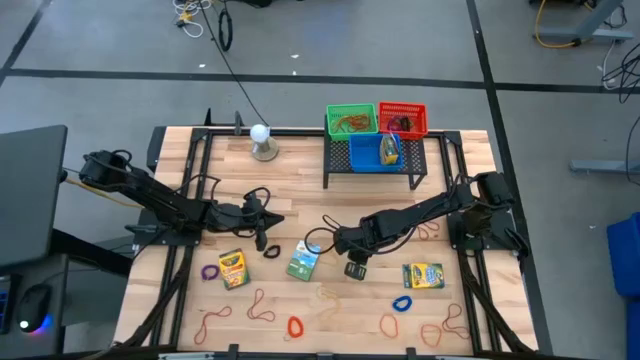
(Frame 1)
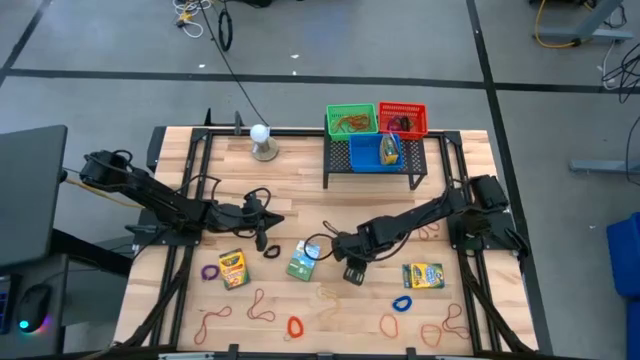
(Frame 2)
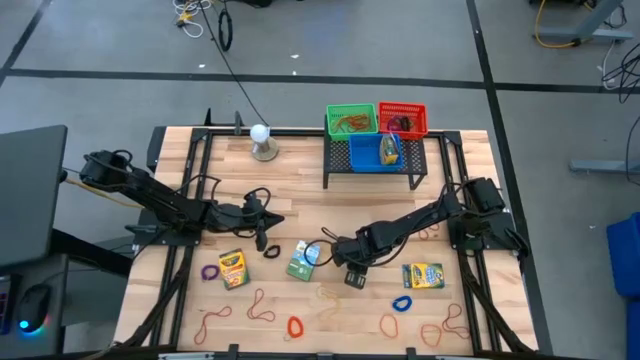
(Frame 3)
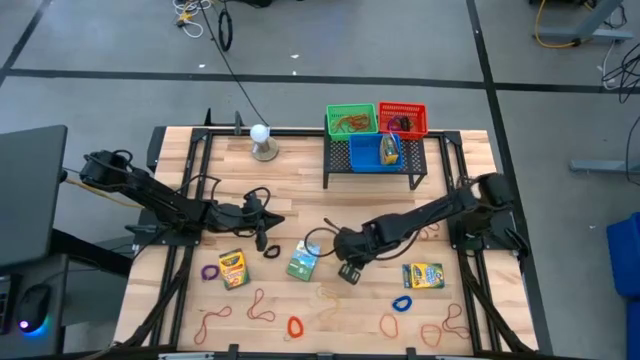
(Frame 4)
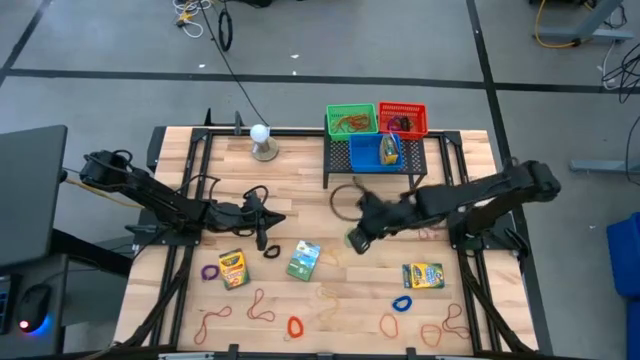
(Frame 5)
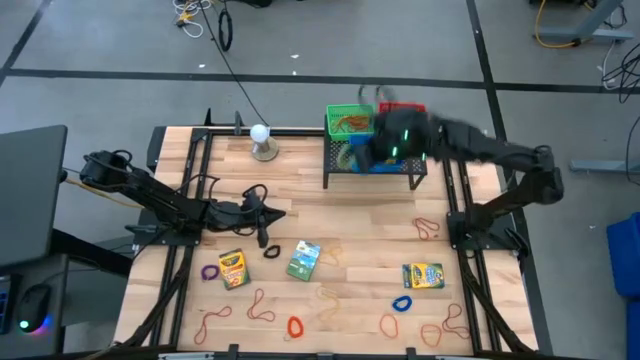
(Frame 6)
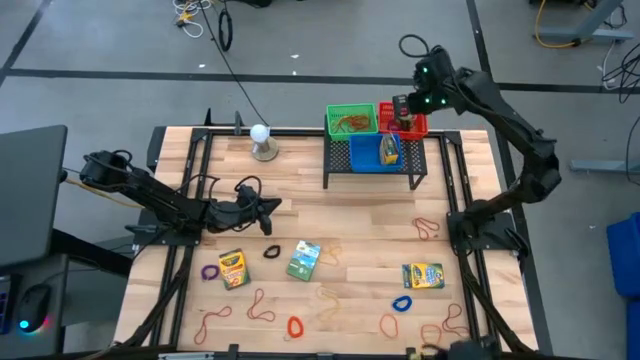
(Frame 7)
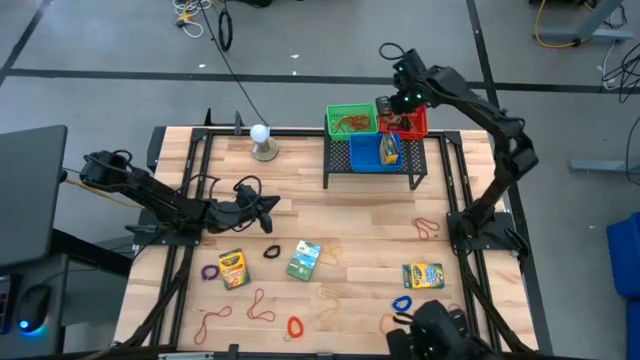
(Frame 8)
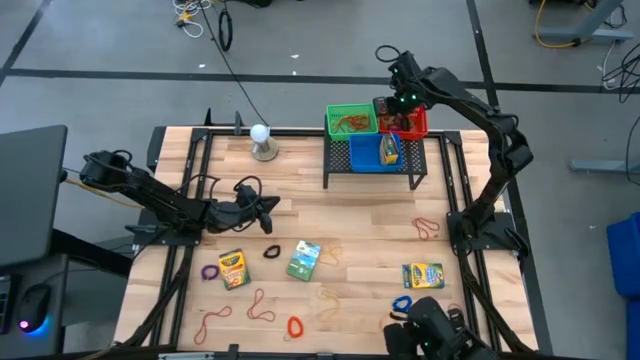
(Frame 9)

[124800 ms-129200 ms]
Task: Pick & Place Office Desk Supplies
Put the green spiral keychain into the red bin

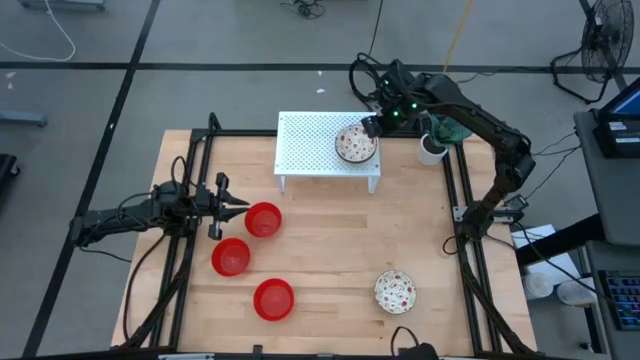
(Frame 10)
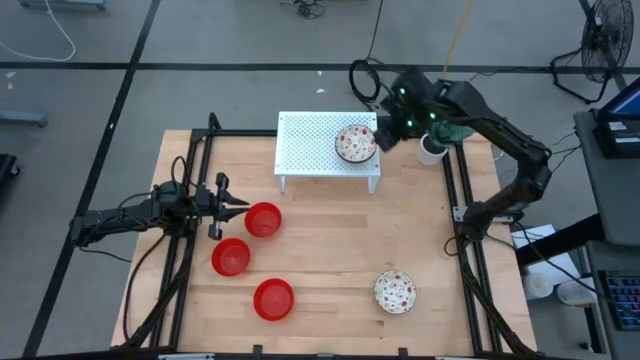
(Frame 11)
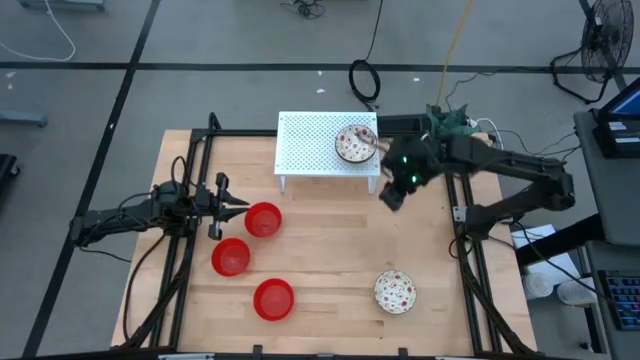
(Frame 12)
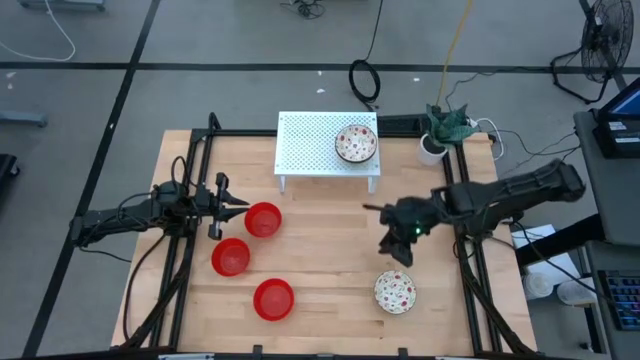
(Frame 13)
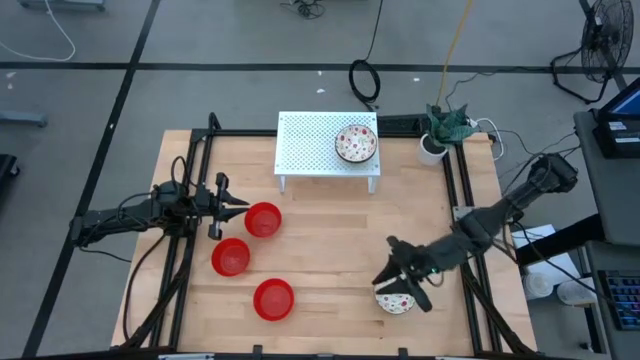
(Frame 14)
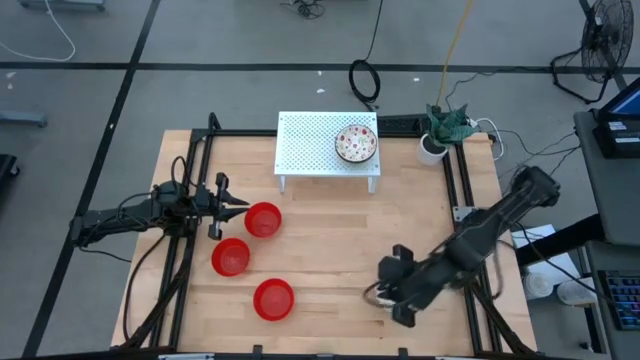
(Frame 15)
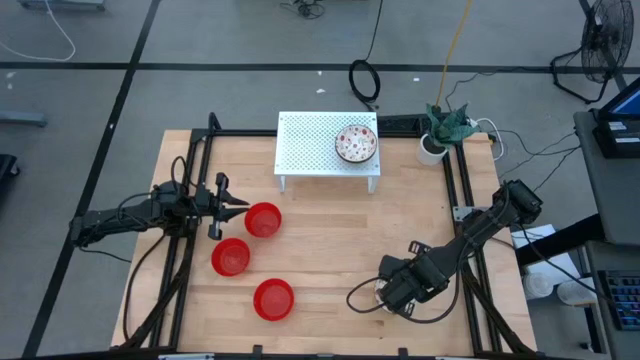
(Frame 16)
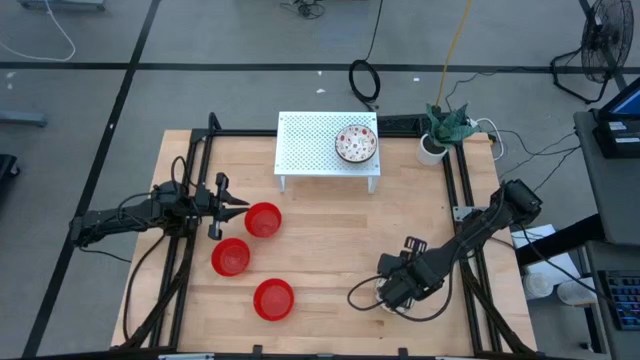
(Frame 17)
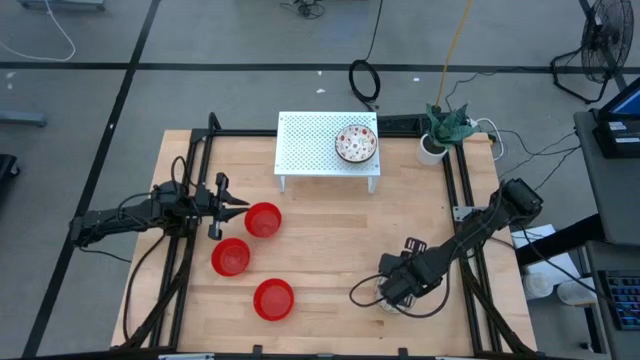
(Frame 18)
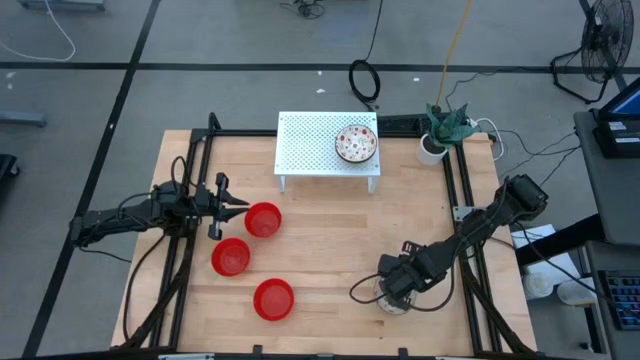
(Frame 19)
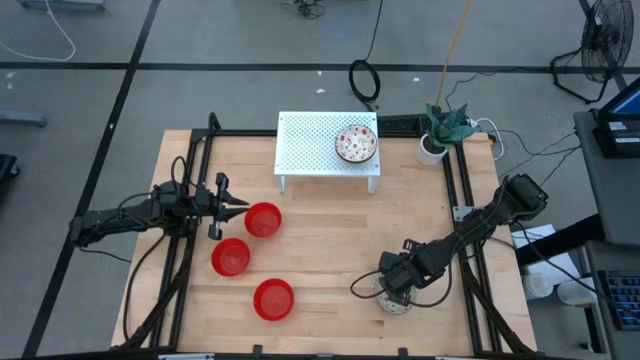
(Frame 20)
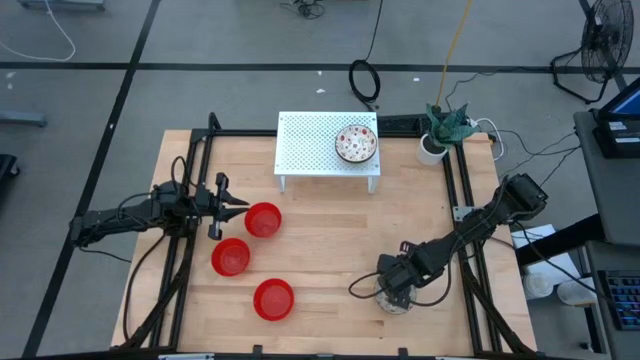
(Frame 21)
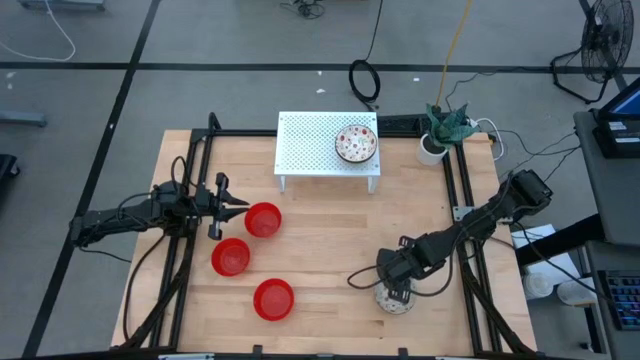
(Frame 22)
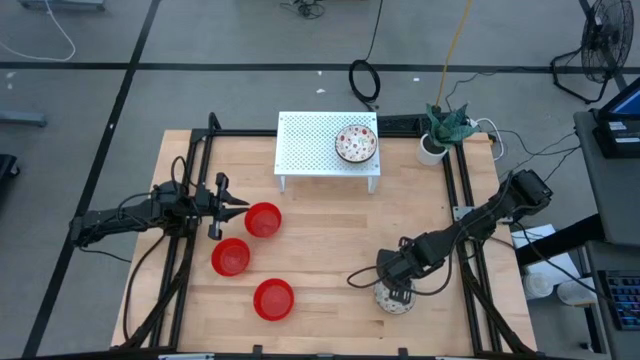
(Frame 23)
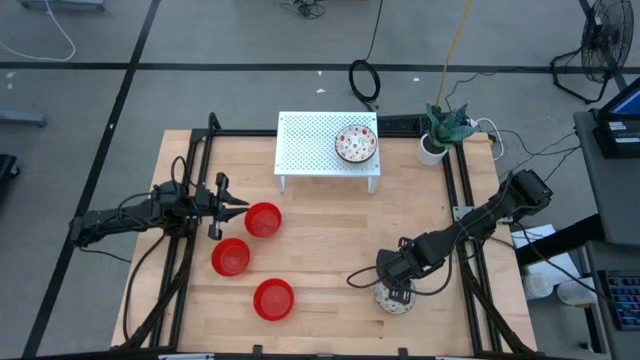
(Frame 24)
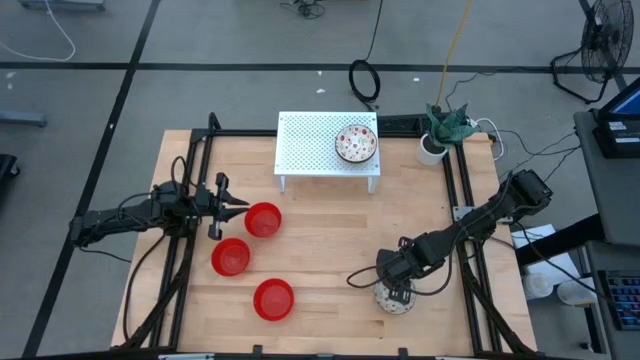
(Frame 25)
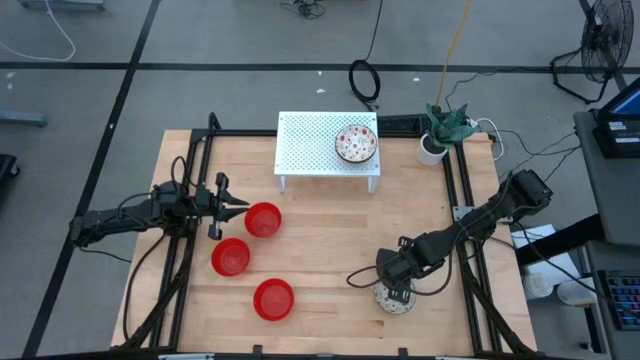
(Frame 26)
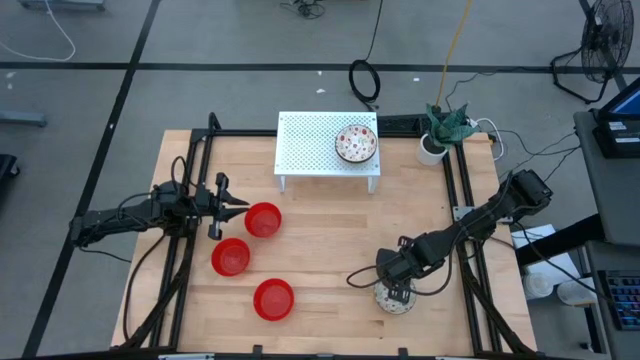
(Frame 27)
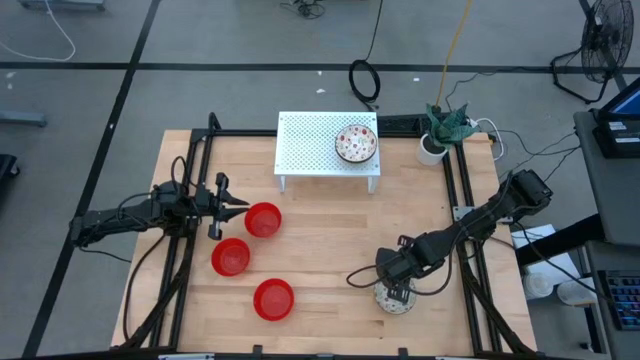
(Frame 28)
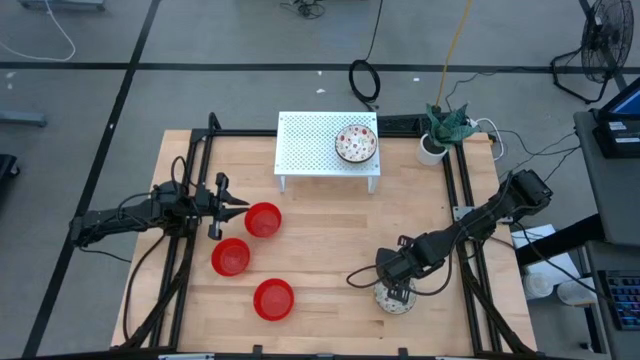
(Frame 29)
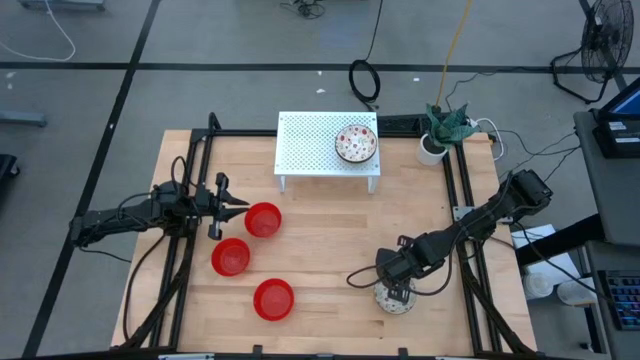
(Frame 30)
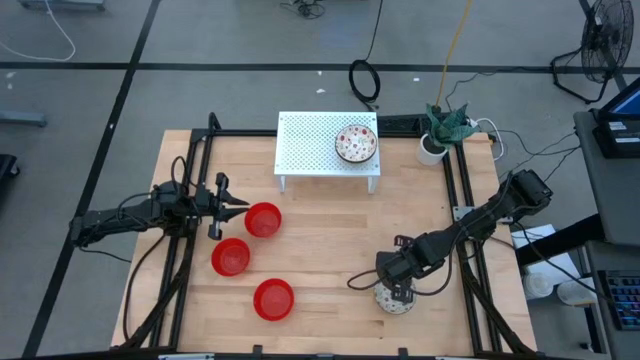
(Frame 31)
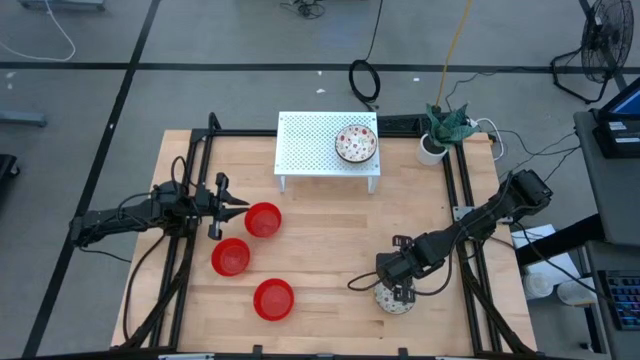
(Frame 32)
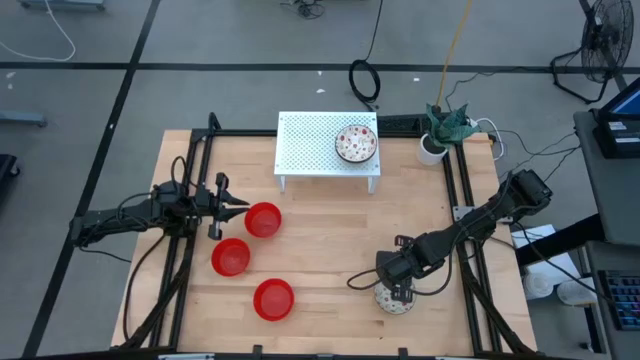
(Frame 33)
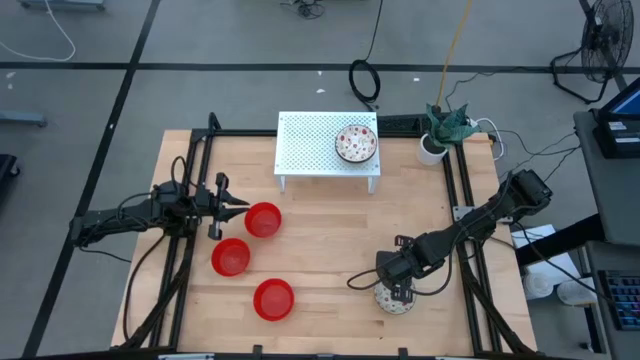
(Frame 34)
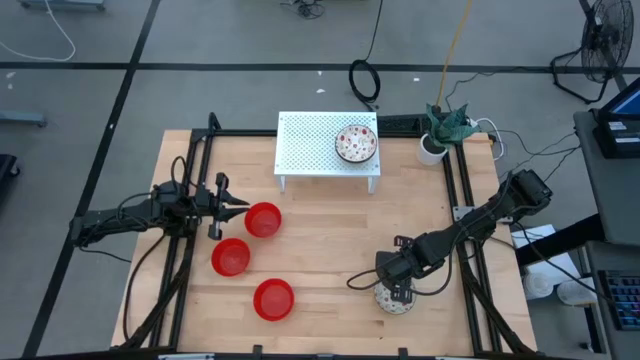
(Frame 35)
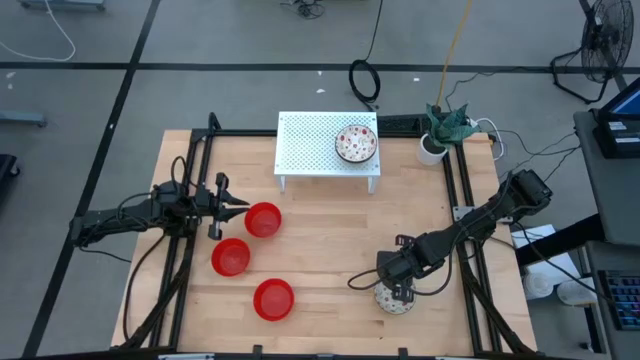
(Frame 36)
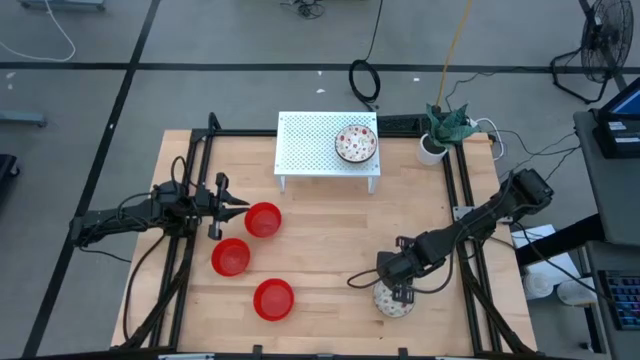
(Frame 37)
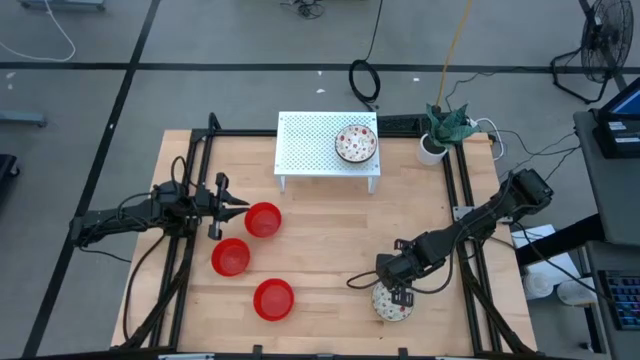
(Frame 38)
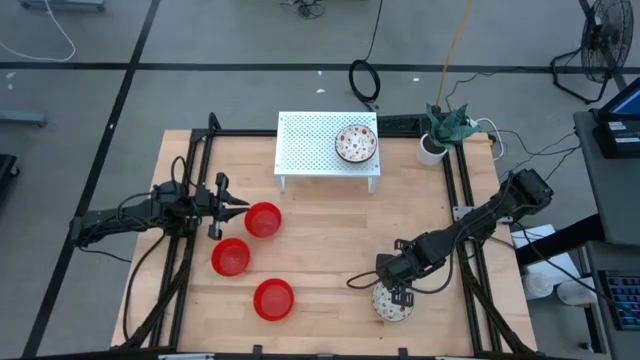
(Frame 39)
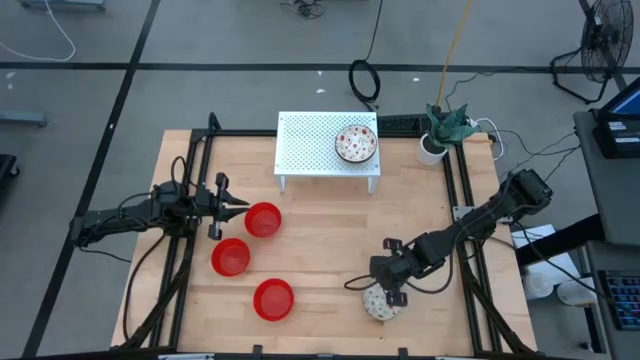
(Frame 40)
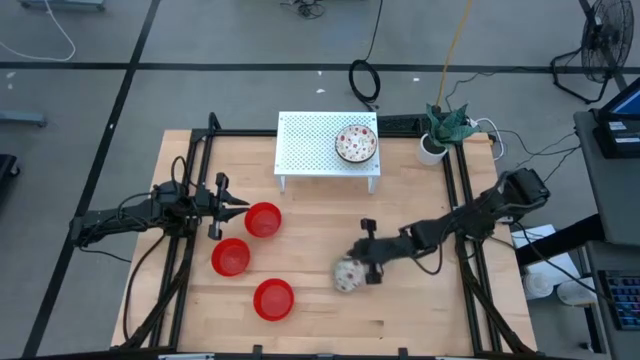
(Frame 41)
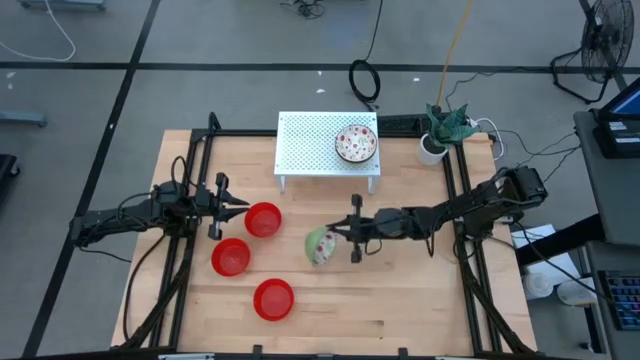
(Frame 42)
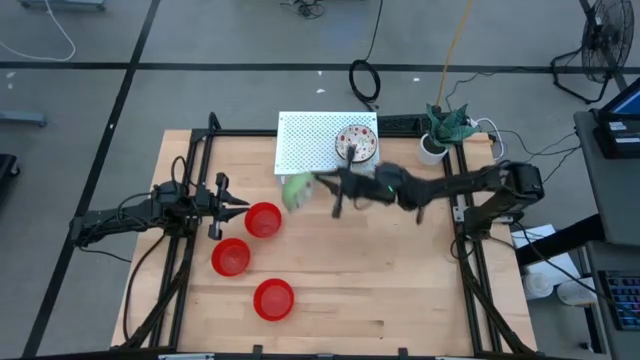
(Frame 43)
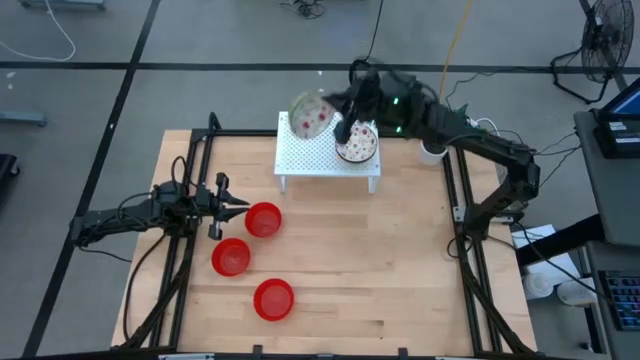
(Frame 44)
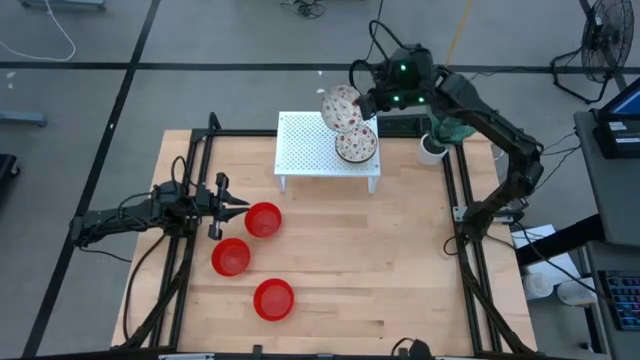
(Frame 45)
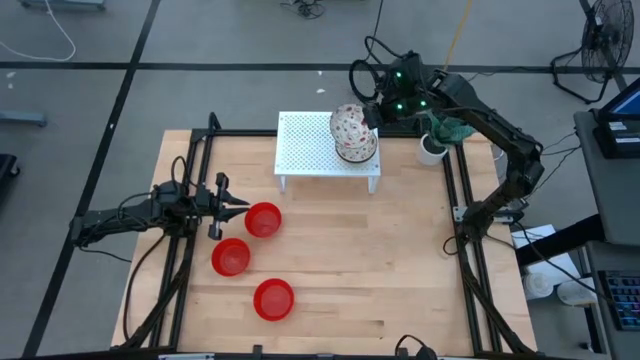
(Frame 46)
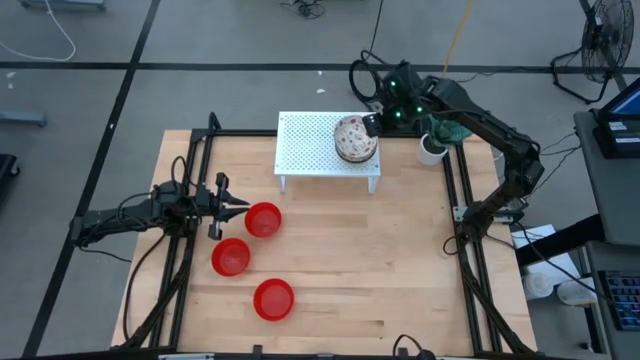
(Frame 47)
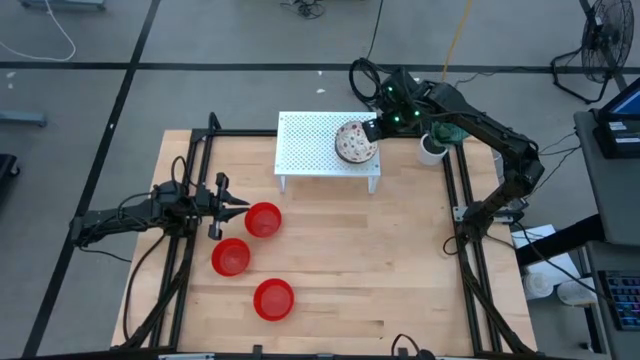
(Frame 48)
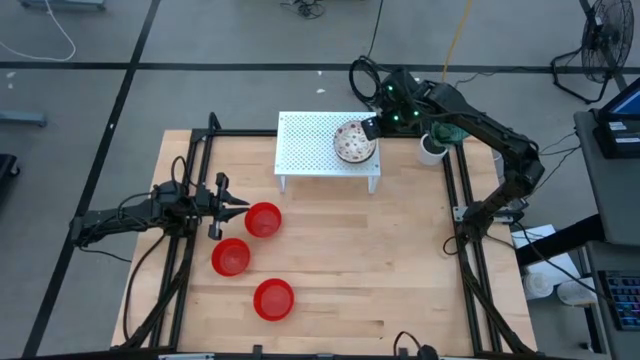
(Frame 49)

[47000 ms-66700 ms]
Task: Pick & Place Mini bowls
Stack the white patterned bowl on the white patterned bowl on the shelf
